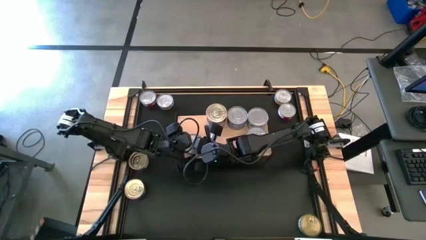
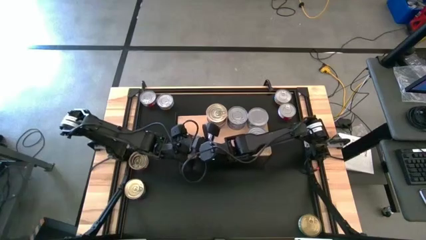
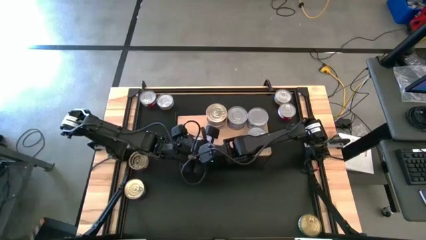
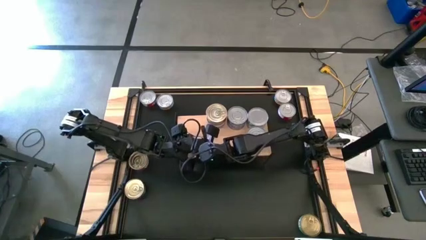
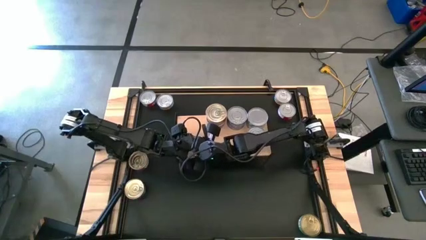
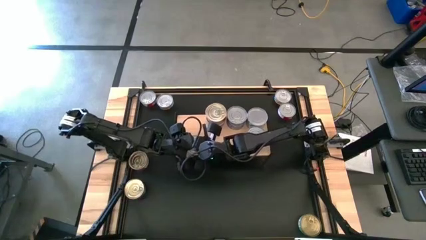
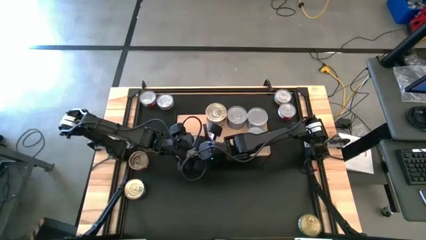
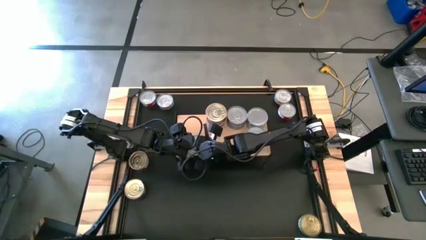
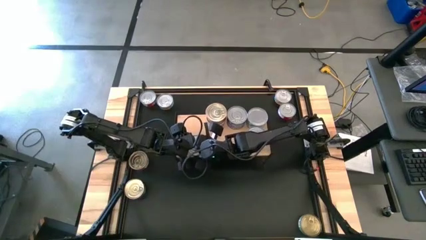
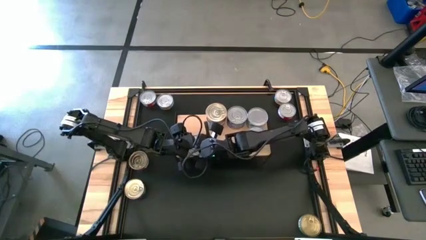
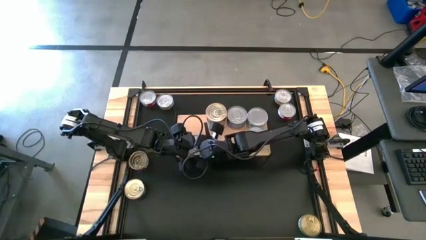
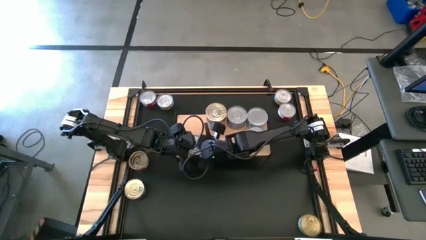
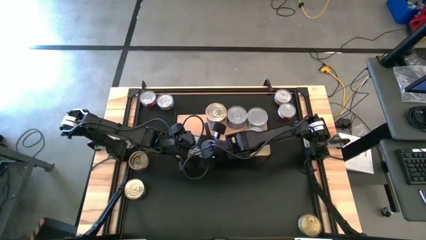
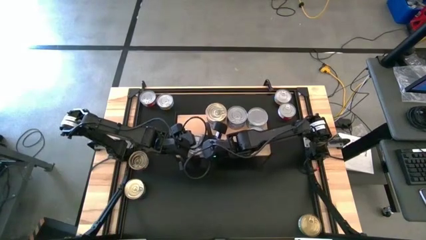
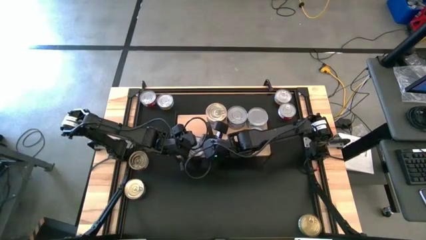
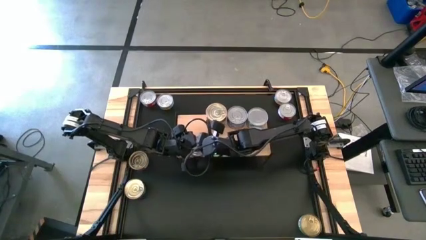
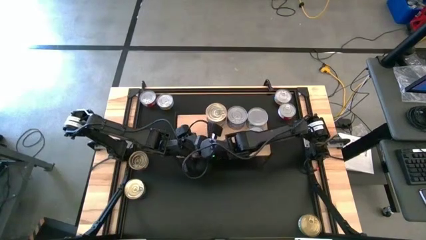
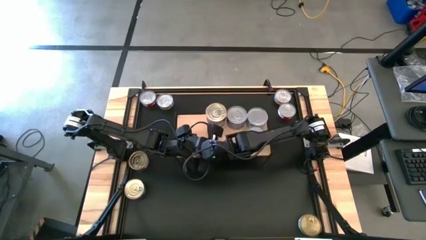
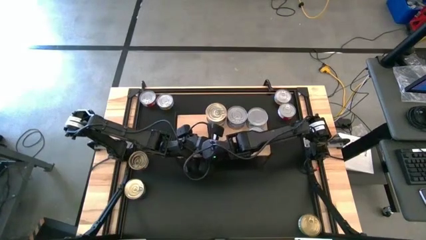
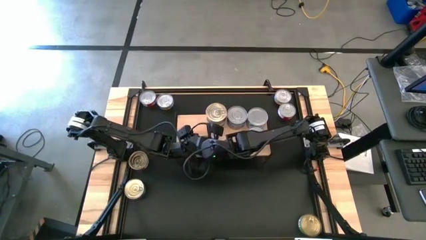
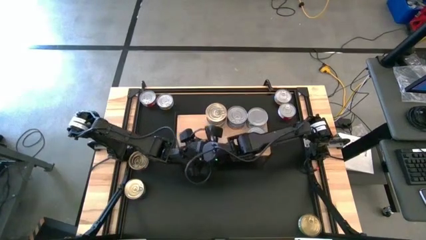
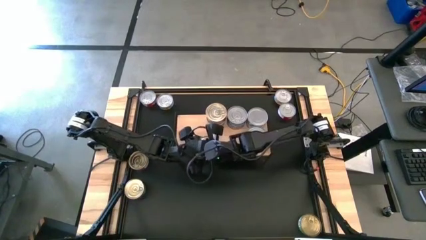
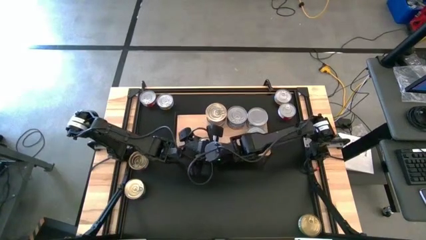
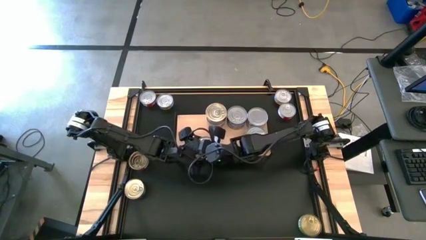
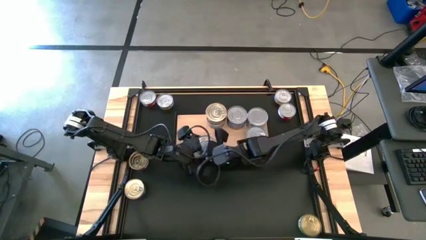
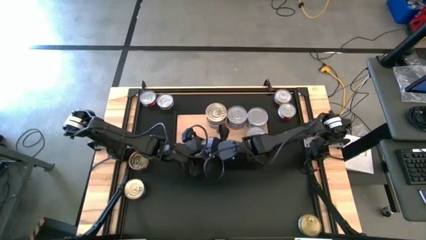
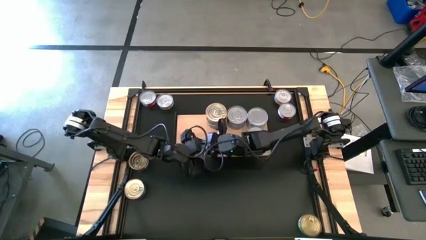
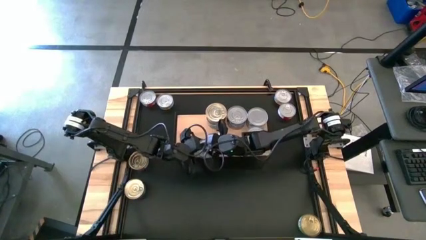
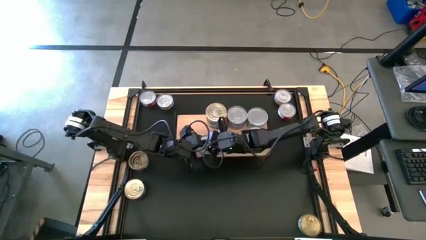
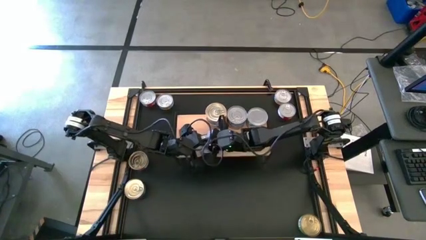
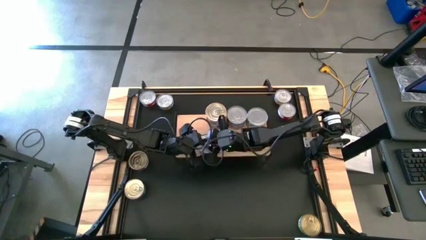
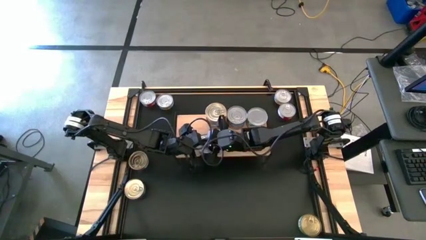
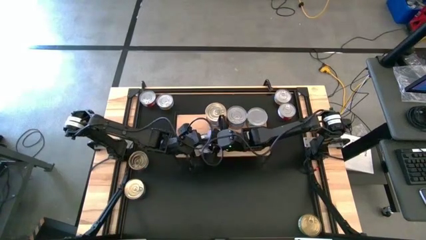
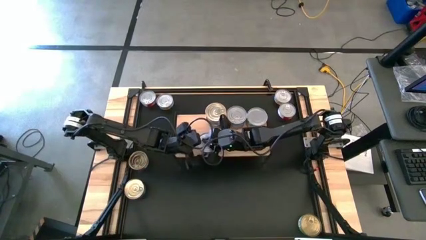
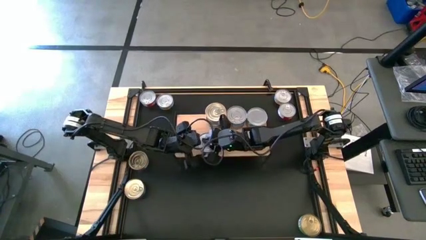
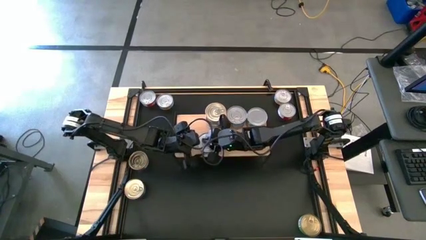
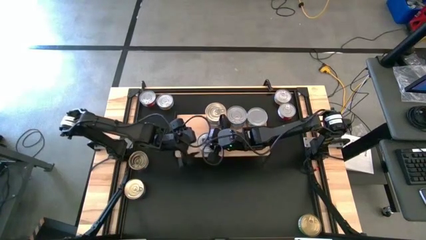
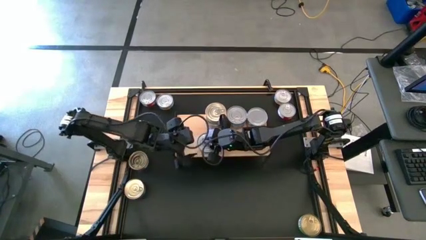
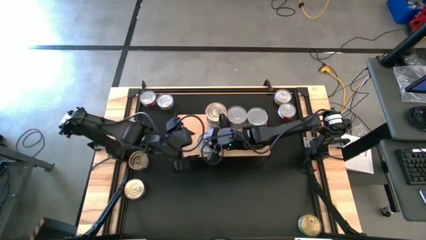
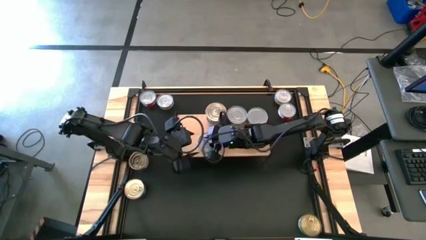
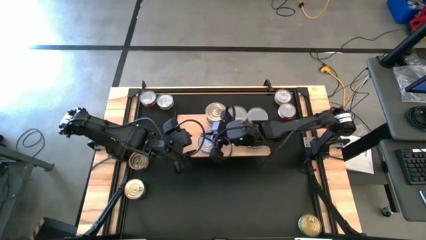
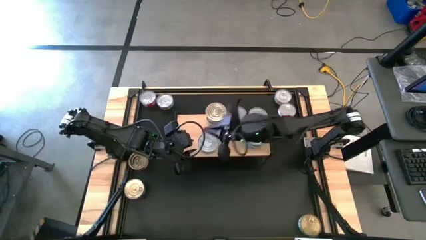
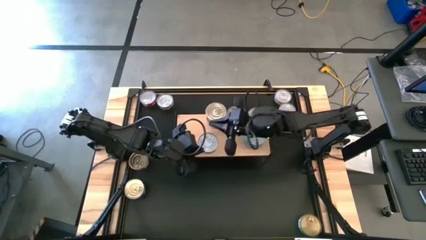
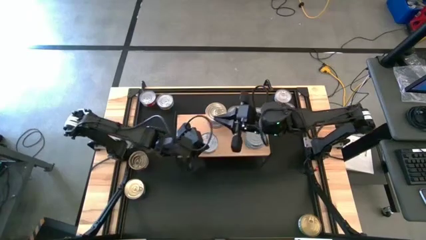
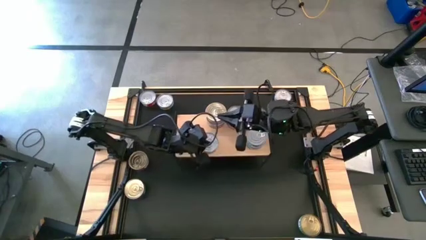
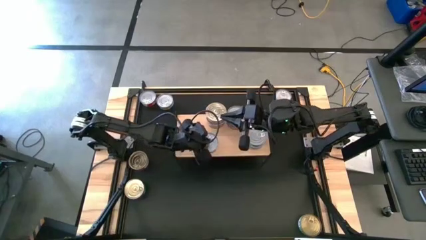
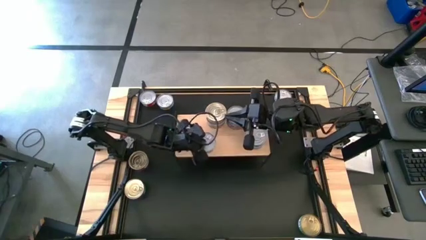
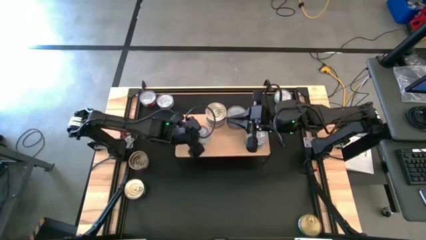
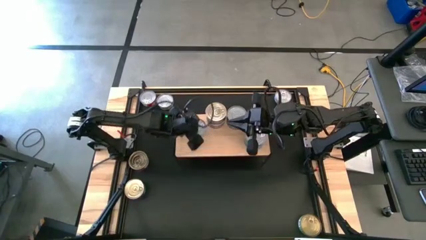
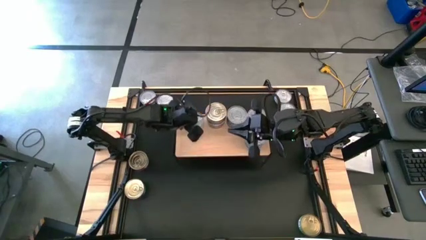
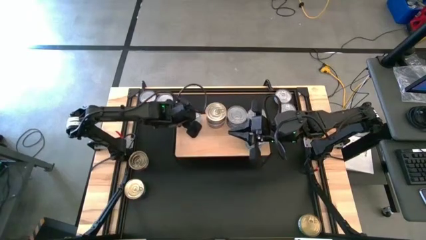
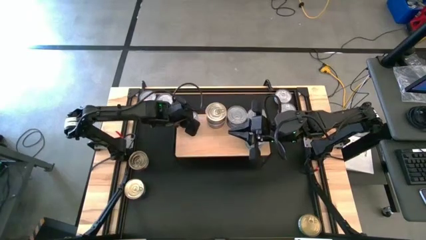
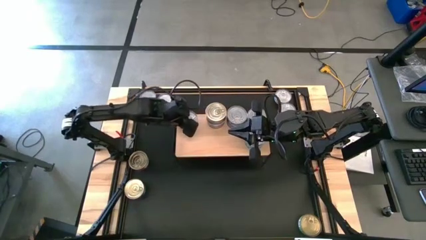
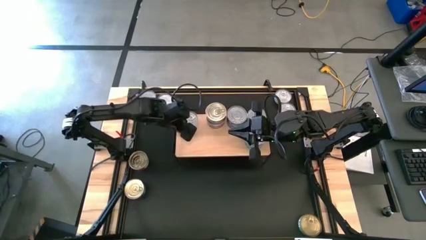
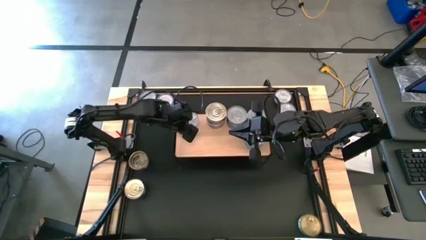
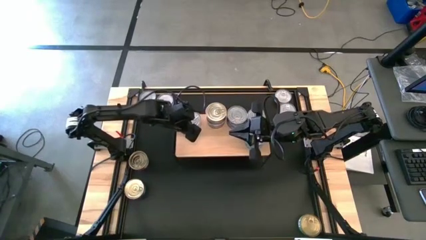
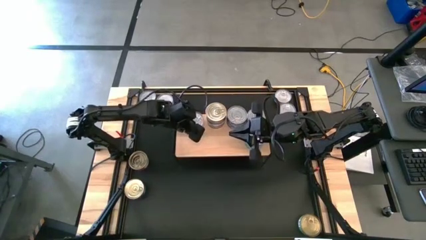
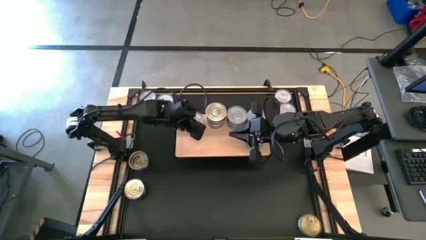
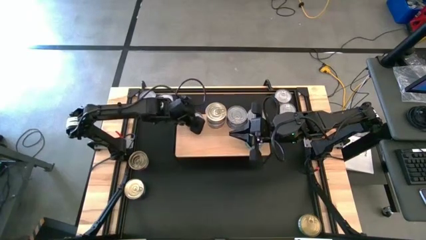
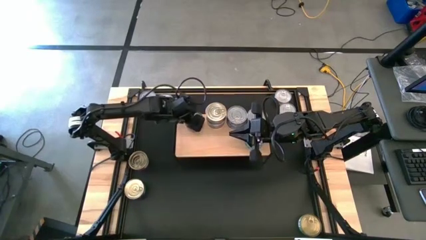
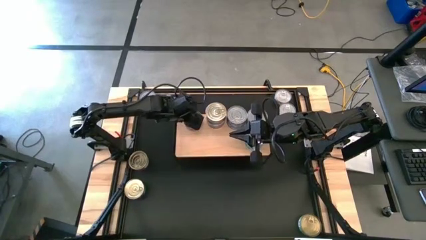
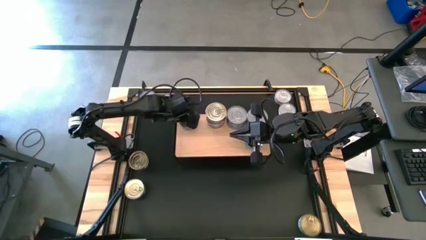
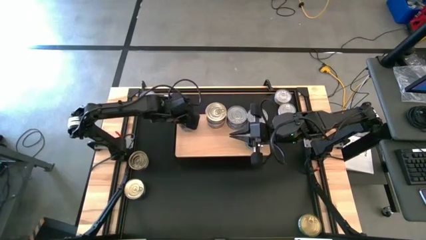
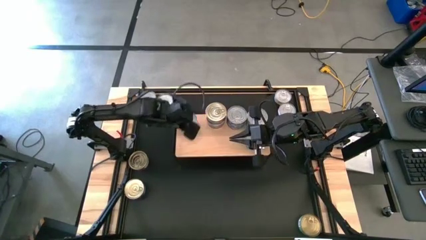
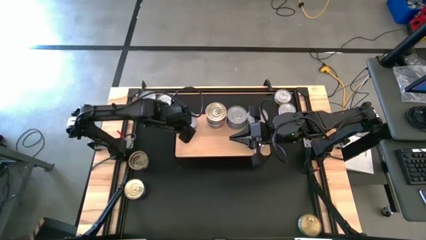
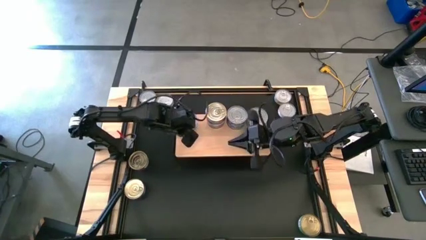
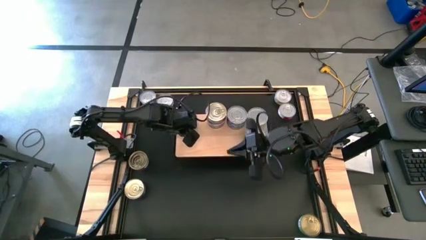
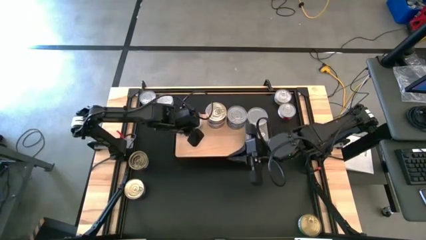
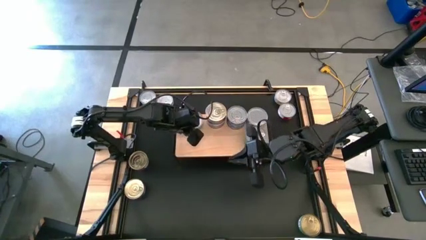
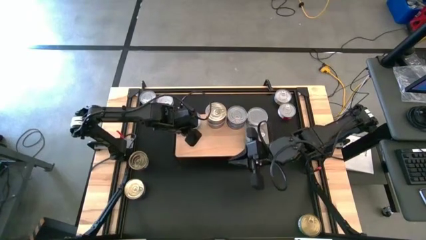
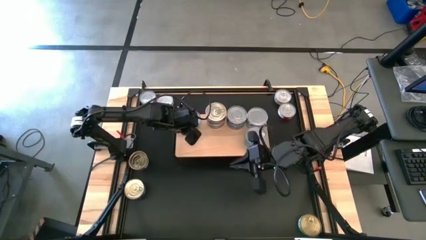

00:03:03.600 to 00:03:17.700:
Task: Stack canned seafood by type on shelf
Put the green tuna can on the shelf

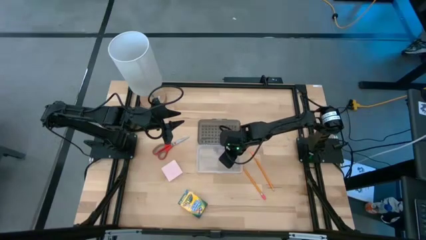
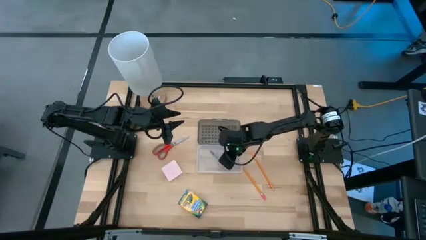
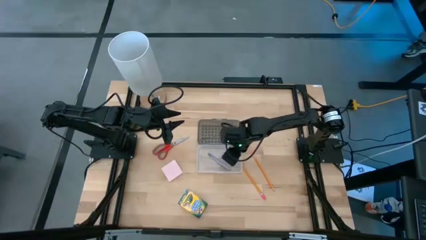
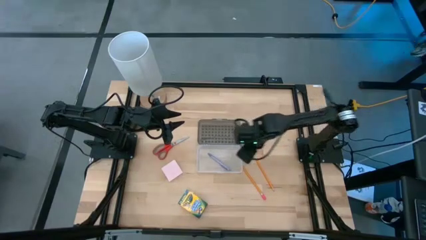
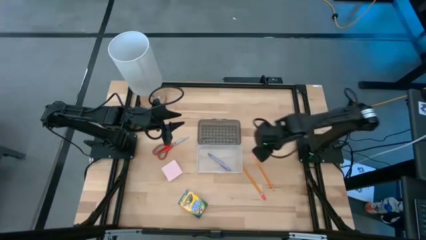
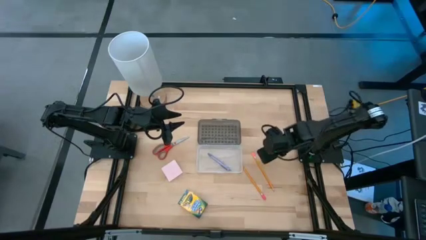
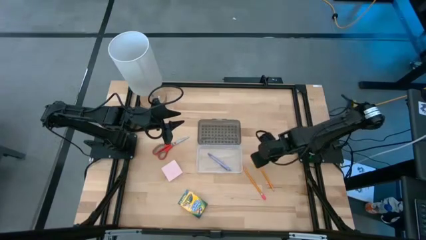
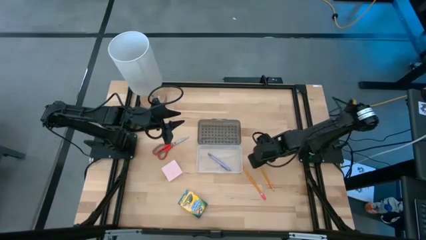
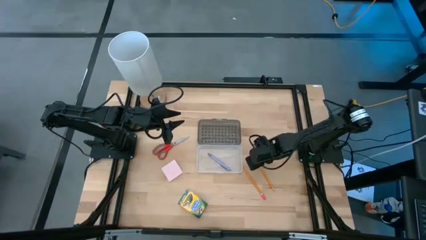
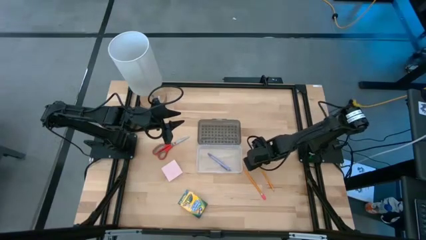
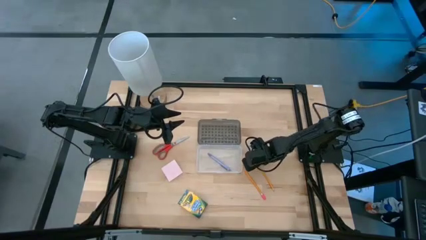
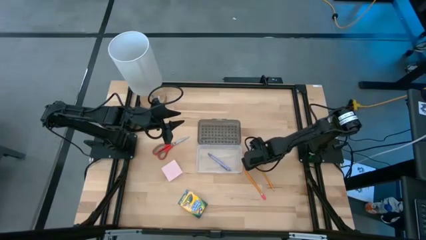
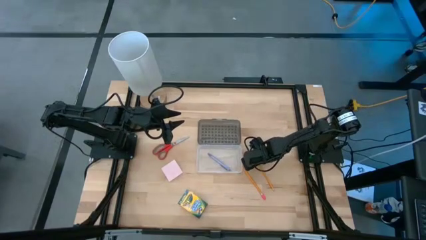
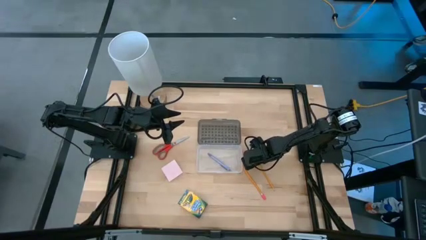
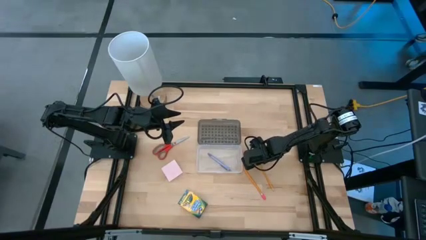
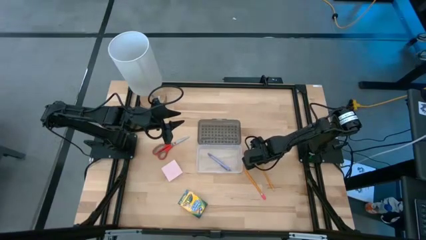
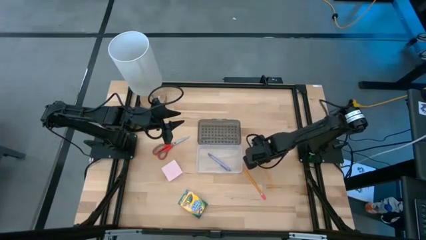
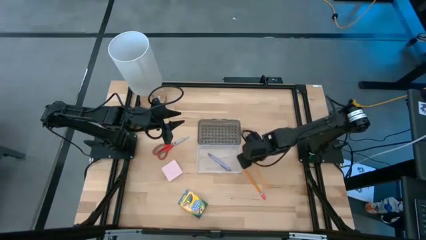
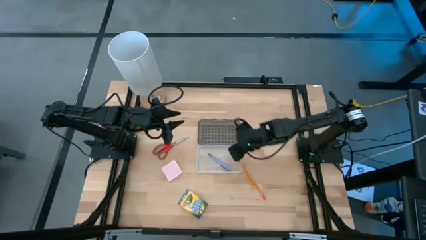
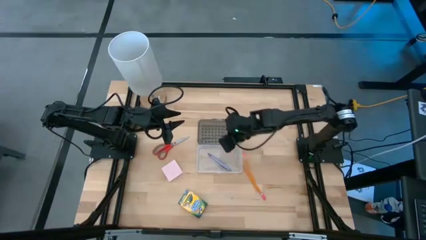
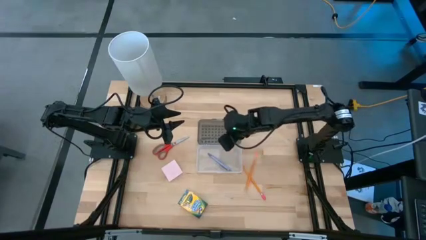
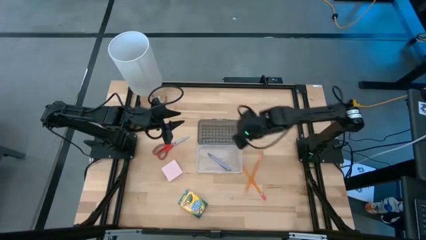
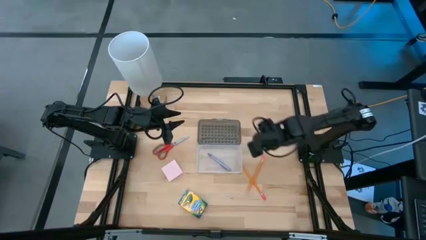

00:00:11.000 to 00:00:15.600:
Task: Pack school essentials
Put the orange pencil into the transparent supply box
